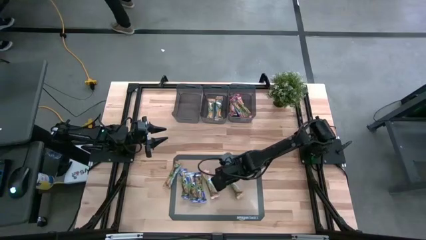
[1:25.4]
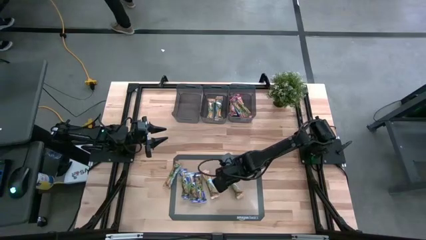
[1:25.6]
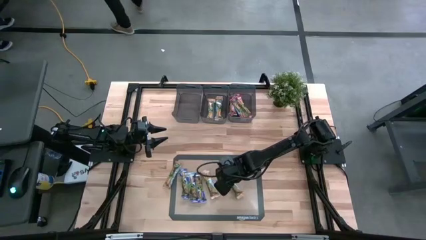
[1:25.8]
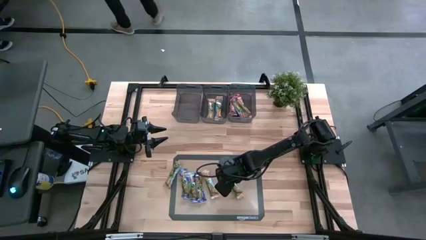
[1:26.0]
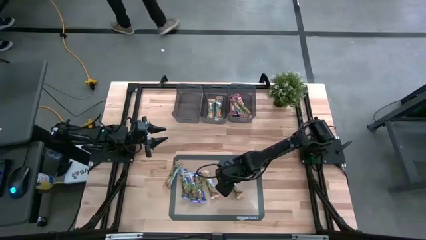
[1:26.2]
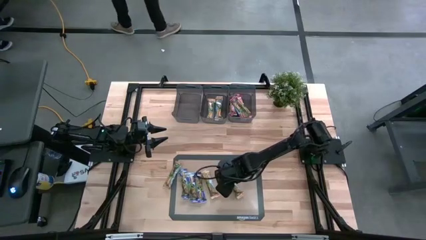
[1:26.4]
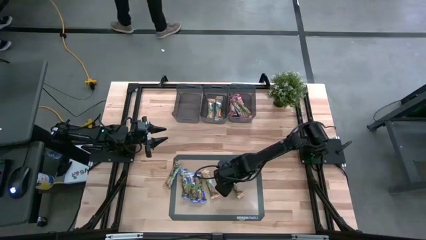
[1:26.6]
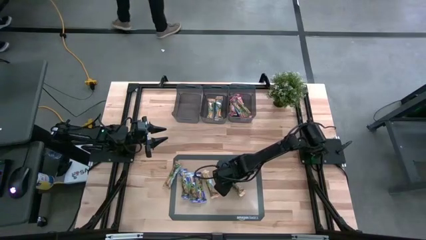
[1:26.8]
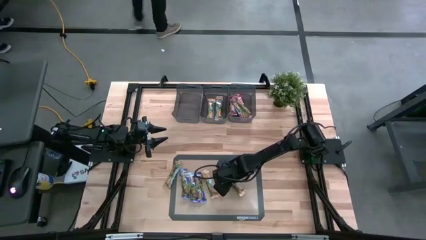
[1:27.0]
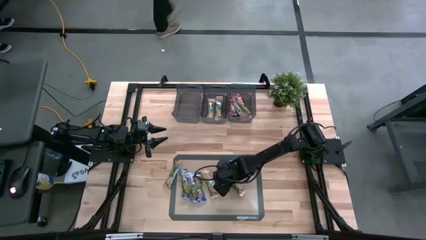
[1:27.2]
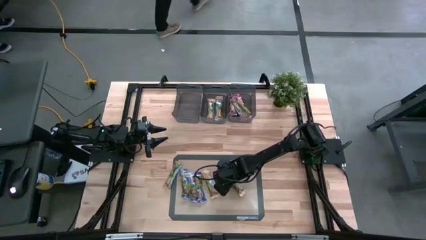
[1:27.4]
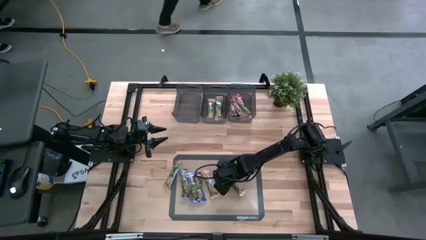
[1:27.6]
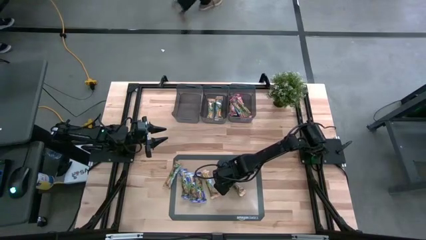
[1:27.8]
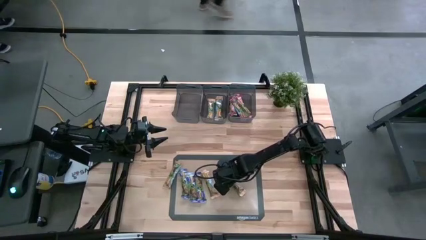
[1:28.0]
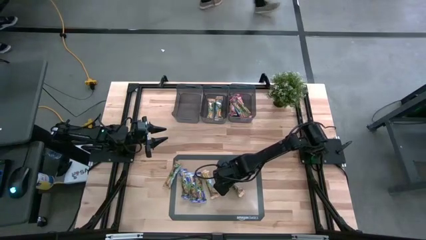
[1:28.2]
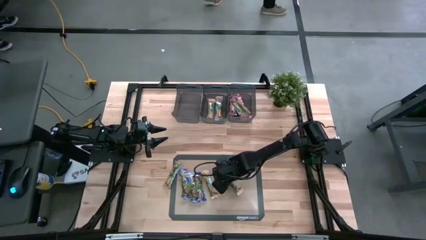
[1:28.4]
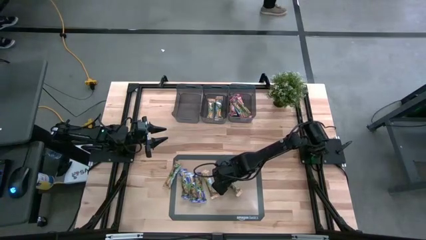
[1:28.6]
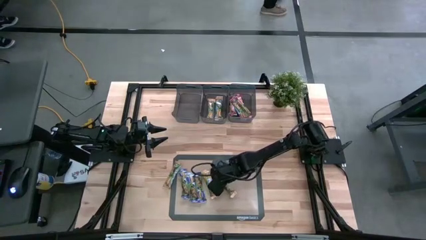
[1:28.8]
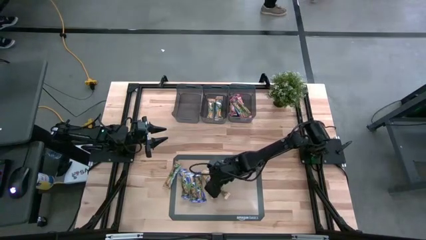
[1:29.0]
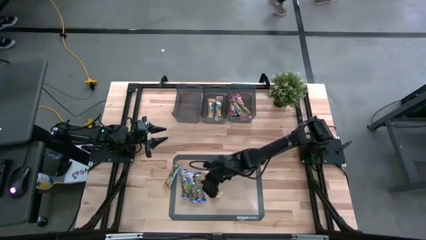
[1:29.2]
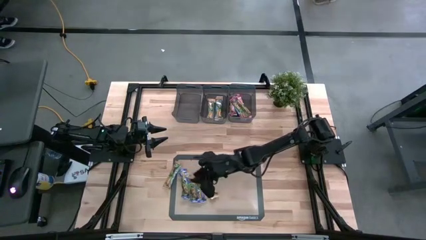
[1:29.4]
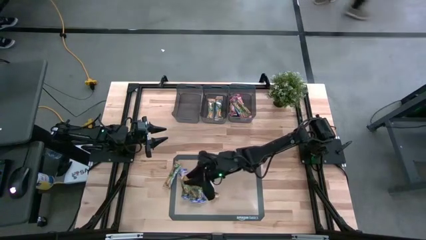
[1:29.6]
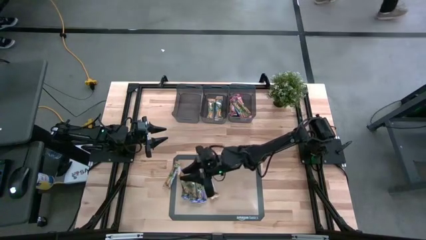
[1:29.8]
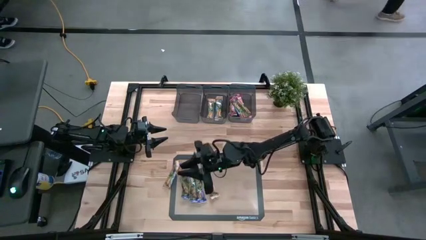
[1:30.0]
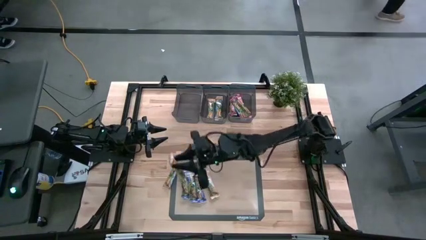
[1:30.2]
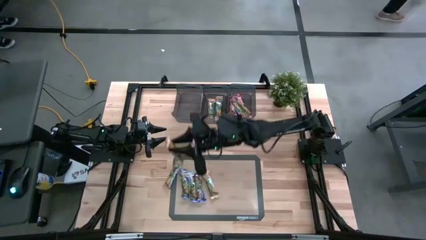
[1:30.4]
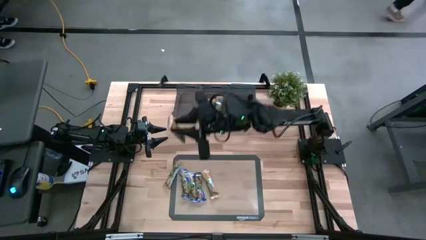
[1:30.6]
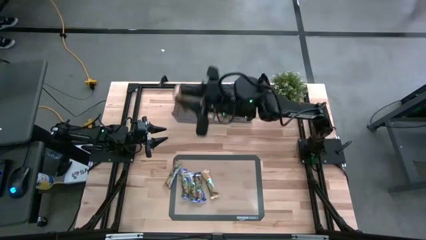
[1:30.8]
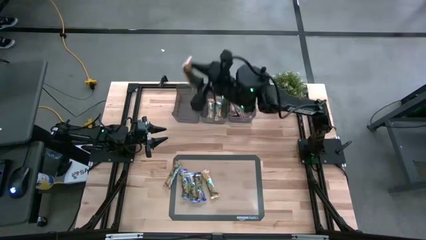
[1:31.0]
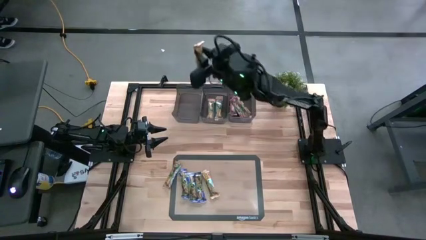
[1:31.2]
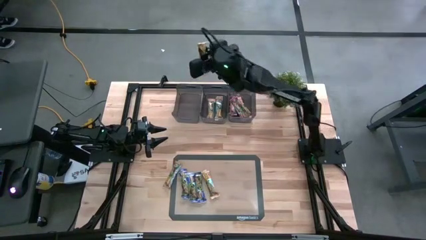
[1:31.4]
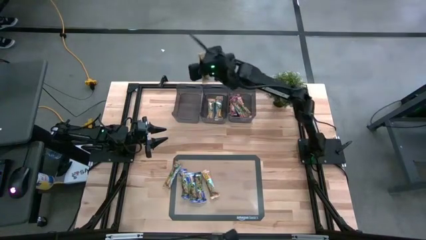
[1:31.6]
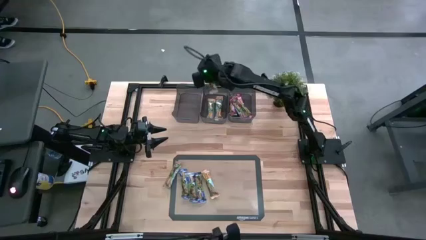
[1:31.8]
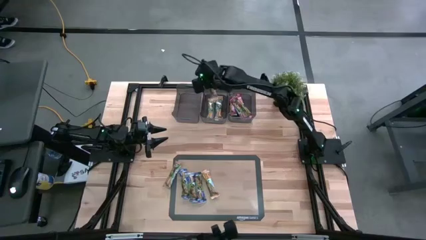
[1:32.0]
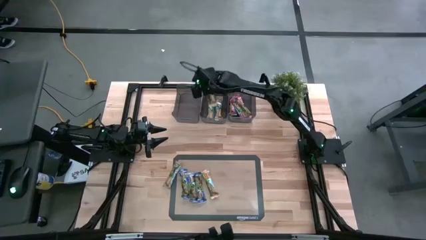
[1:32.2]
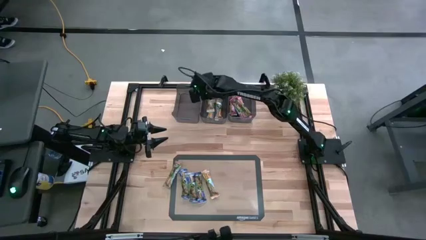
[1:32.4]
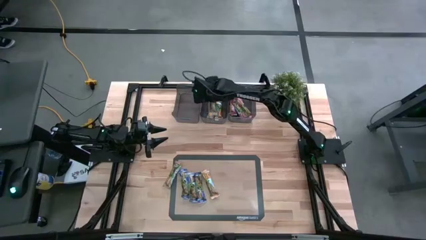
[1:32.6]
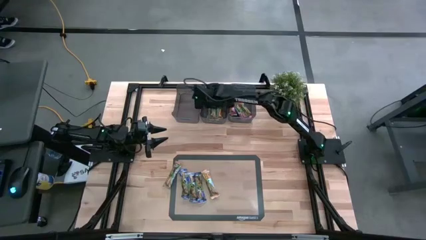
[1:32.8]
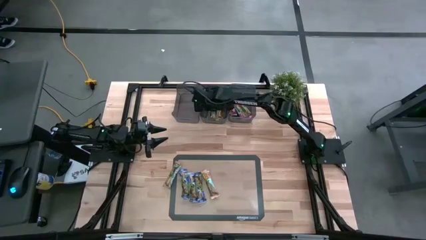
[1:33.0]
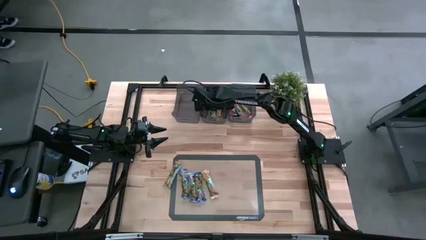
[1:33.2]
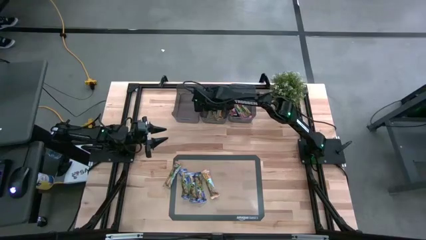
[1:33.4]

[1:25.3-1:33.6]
Task: Pick and place Granola Bars by type
Put the orange granola bar into the middle black bin

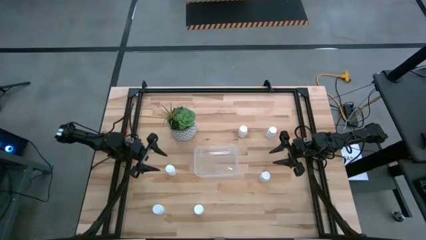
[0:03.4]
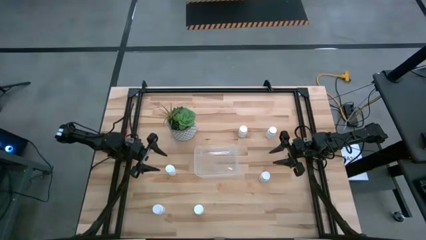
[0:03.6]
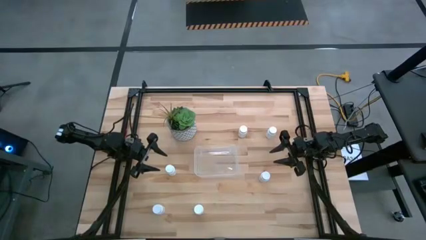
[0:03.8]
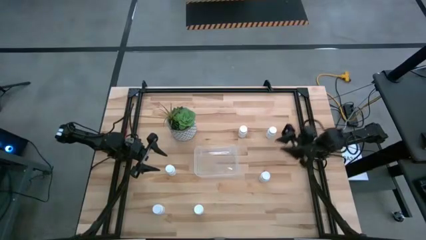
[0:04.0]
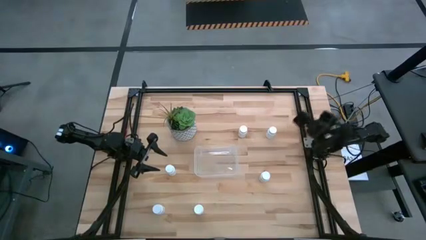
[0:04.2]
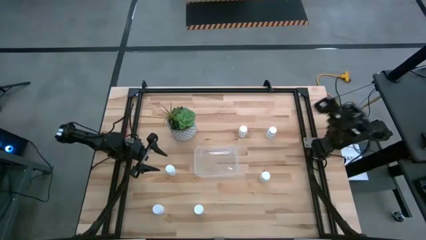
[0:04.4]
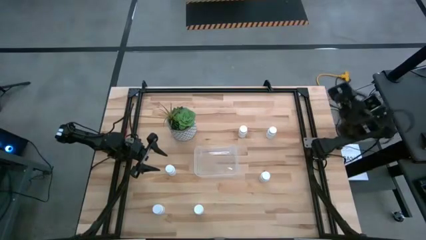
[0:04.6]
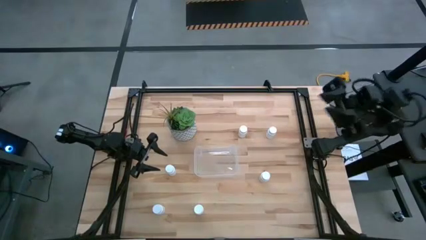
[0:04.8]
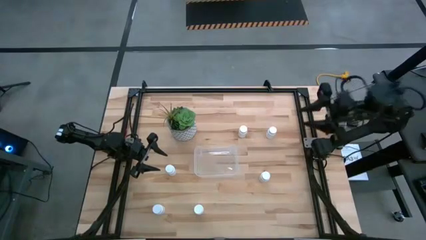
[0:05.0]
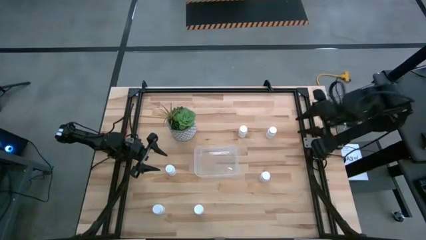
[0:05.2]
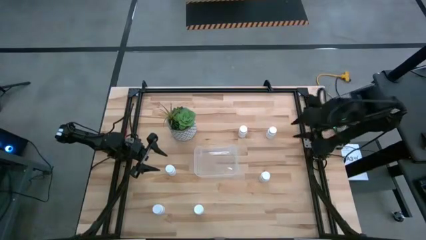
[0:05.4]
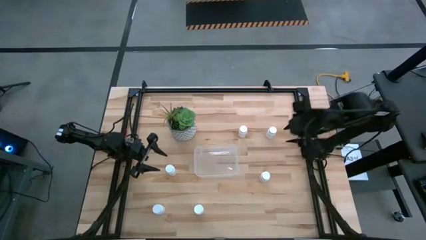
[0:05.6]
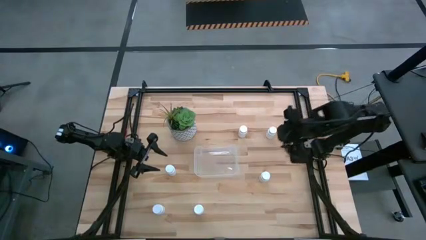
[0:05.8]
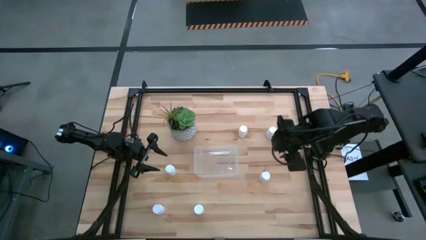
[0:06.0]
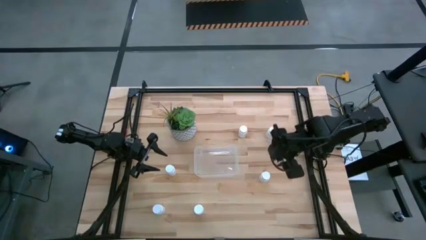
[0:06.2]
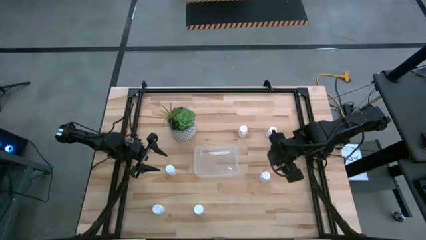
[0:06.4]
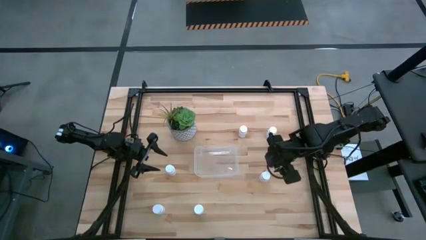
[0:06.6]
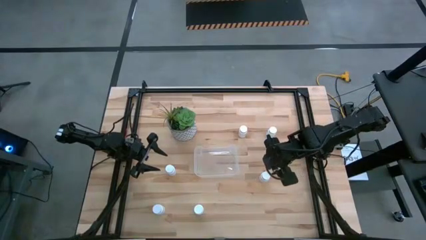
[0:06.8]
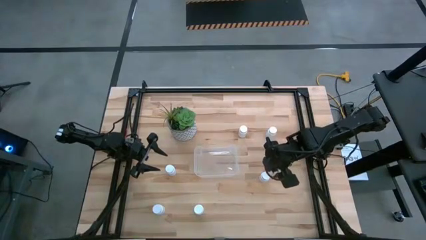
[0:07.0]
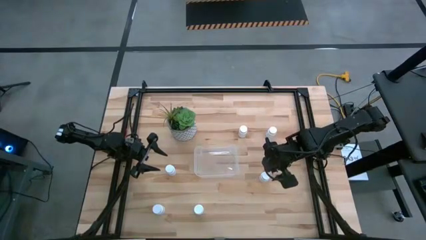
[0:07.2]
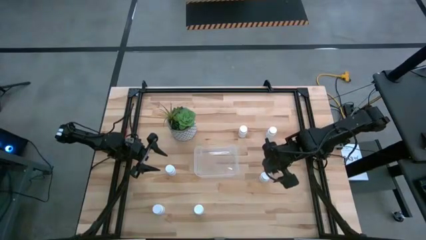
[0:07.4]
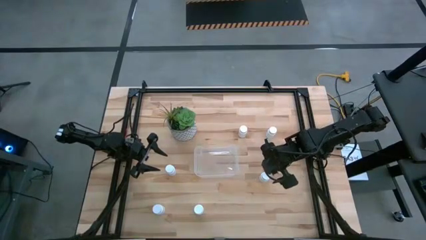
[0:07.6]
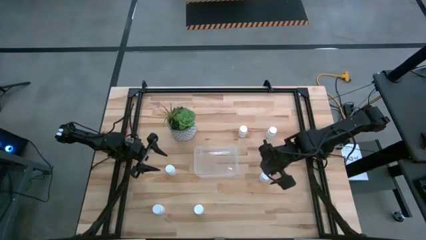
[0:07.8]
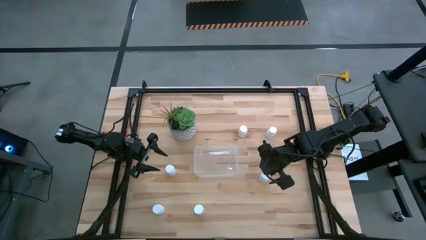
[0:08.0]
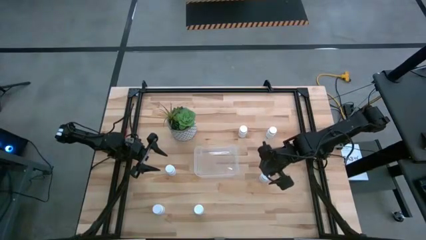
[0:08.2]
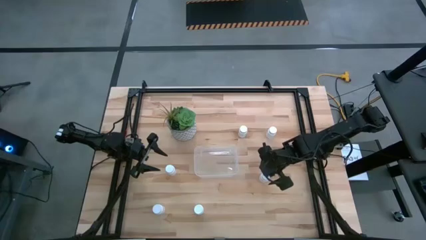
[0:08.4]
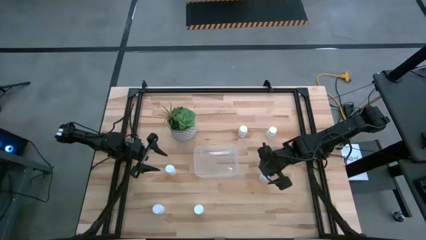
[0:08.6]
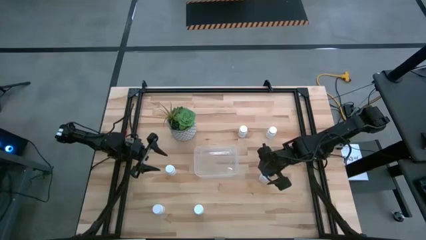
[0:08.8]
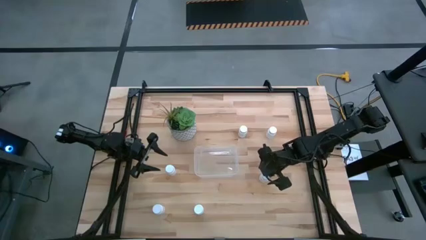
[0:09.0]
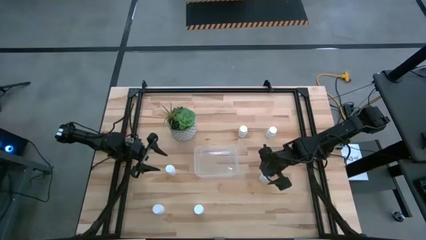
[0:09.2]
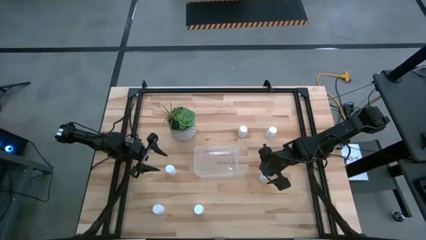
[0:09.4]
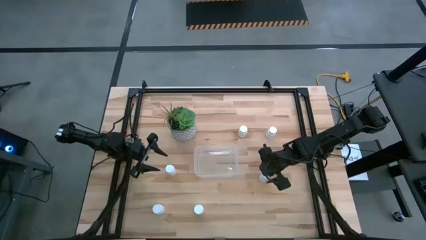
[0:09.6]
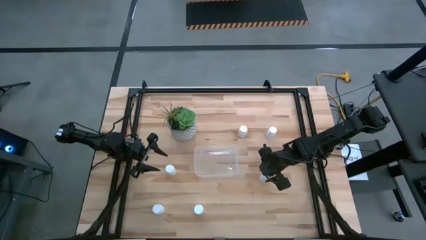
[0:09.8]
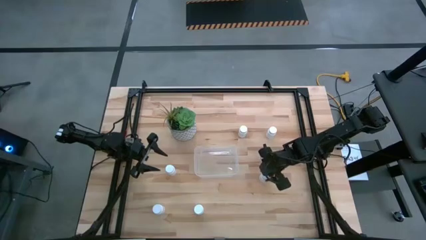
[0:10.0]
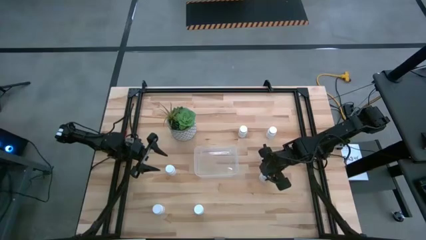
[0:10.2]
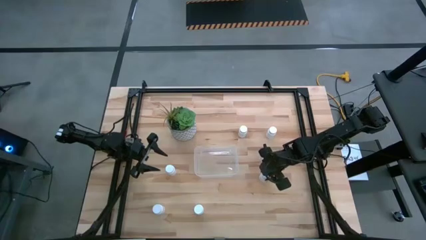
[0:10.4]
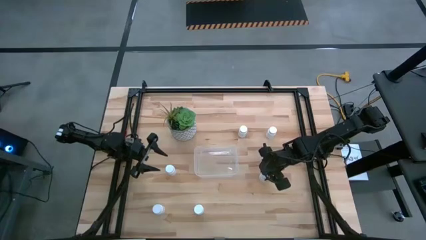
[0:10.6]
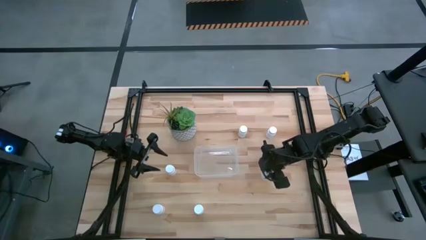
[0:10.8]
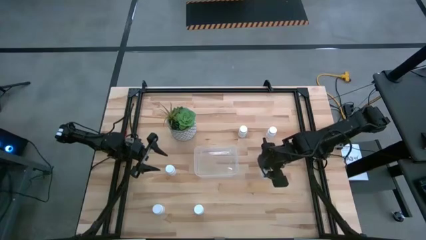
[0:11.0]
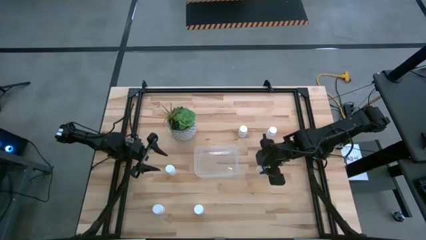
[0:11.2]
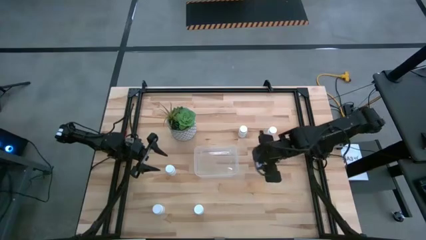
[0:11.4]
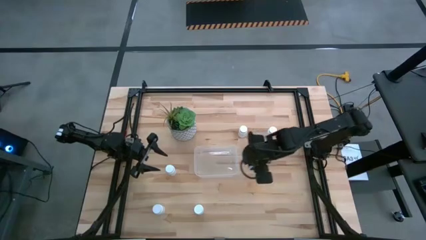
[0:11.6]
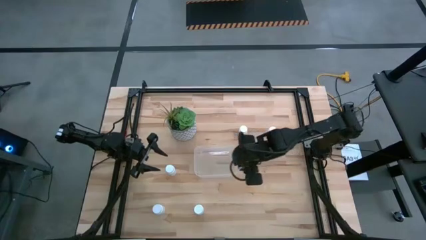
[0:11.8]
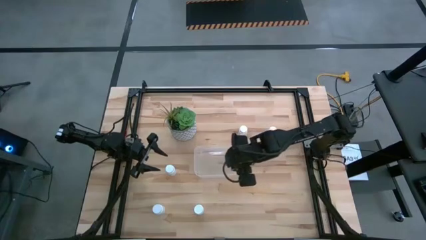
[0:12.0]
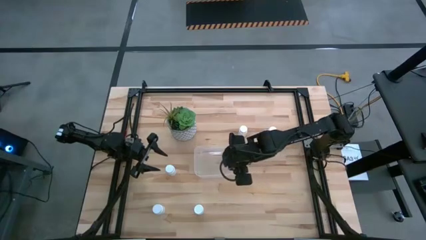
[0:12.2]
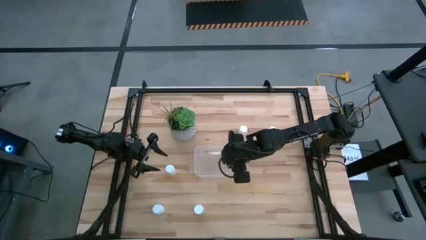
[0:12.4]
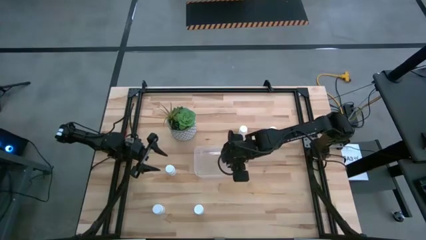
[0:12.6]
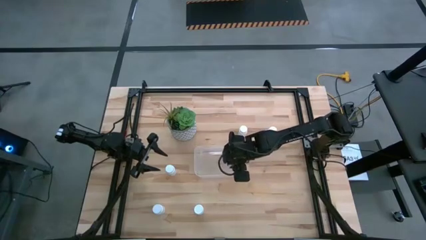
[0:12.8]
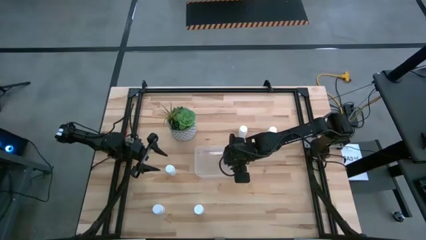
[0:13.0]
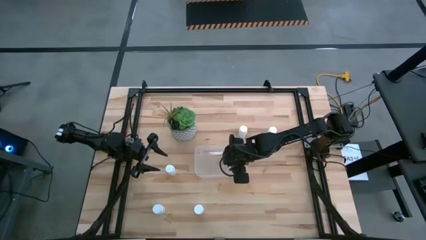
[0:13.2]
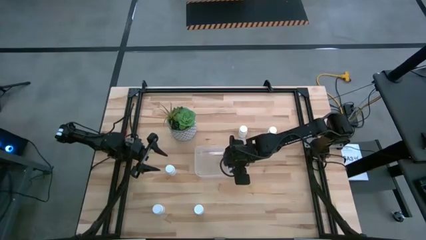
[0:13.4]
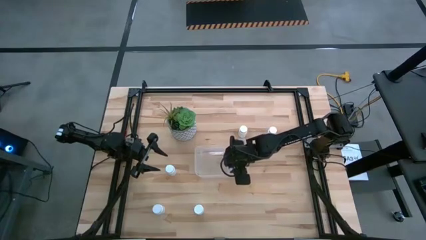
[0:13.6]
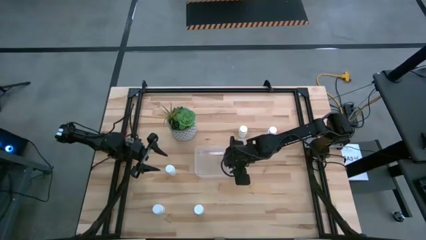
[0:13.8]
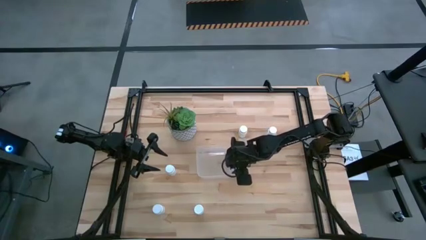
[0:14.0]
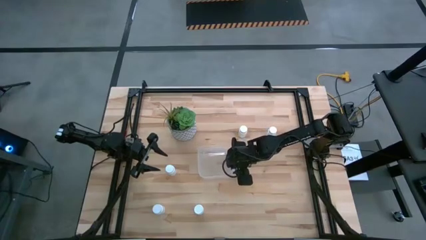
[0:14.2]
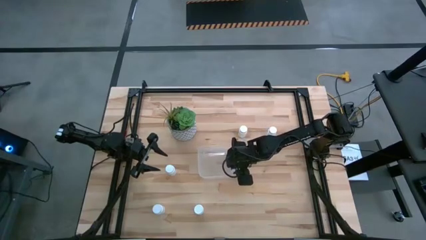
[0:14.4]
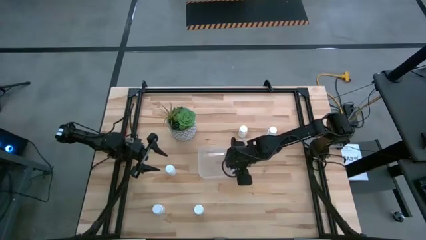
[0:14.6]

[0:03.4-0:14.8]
Task: Pick and place pill bottles into a basket
Put the white pill bottle into the transparent bin
